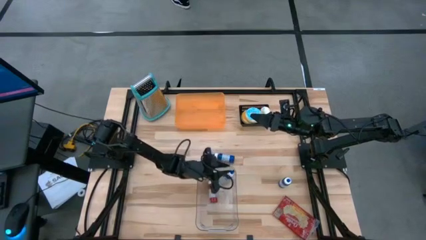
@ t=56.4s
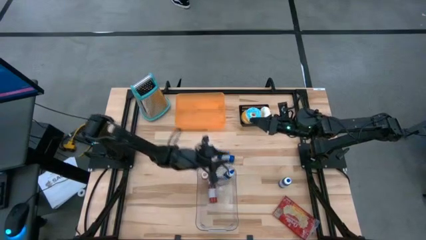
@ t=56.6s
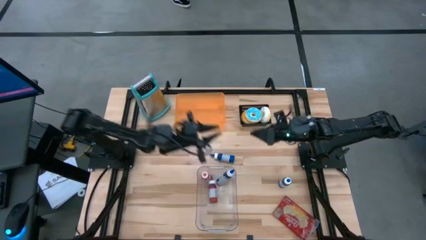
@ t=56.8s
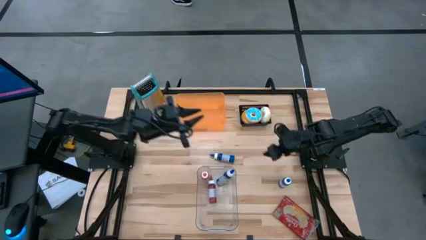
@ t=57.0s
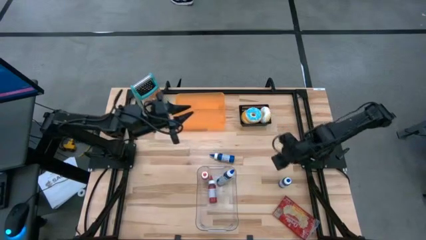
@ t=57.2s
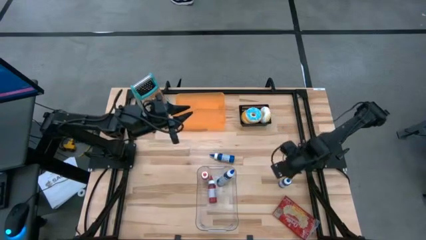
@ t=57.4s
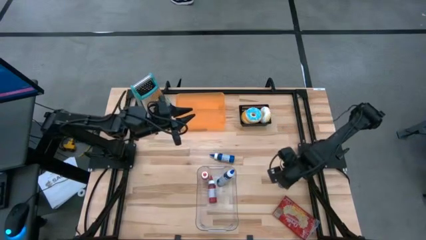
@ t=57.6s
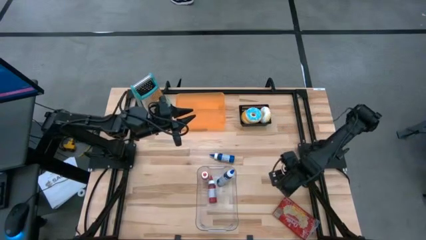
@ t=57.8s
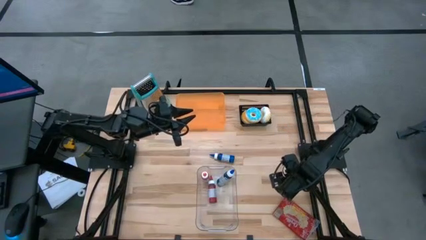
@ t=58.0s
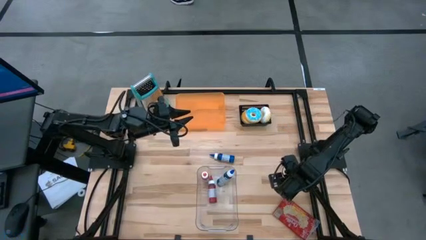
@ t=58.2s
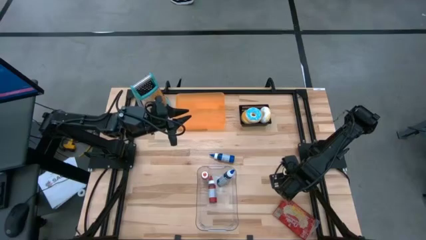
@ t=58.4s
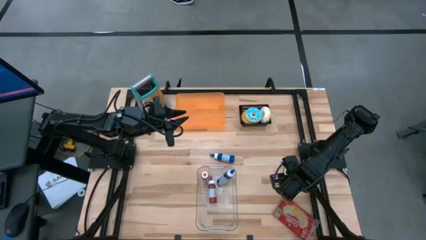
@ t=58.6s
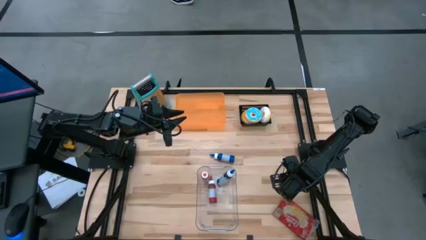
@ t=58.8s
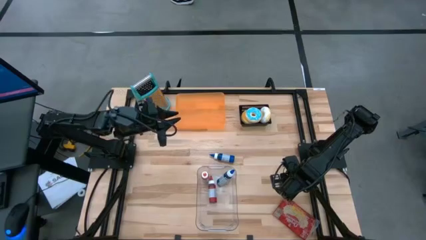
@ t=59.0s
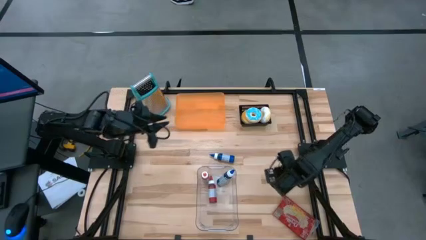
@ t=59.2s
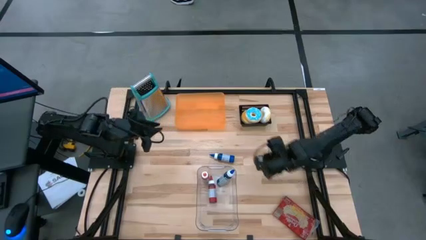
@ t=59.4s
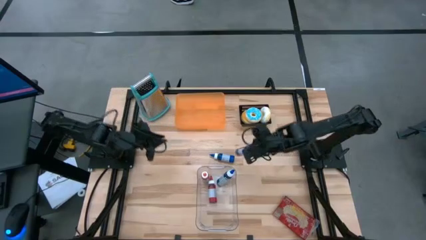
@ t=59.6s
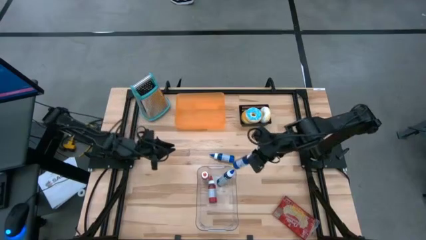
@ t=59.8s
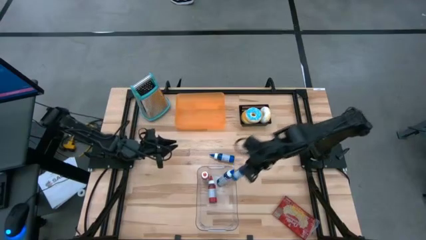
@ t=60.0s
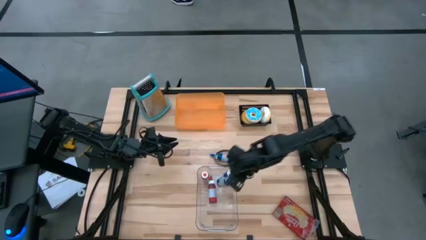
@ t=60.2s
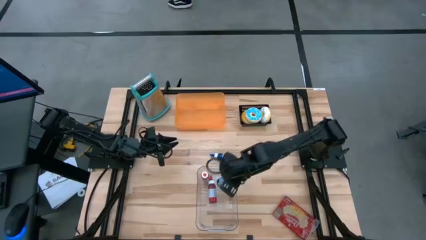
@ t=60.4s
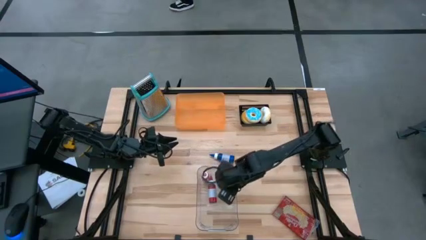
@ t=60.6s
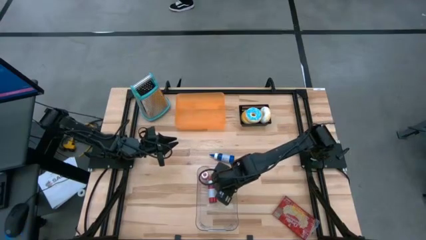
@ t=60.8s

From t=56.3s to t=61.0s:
Put the right blue food coloring bottle into the transparent bin

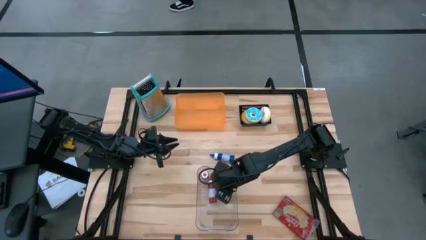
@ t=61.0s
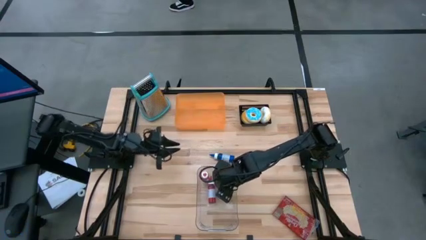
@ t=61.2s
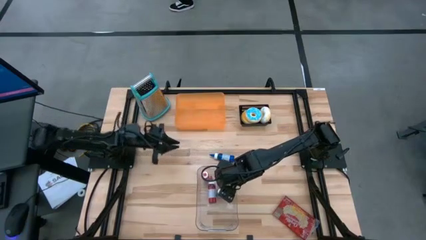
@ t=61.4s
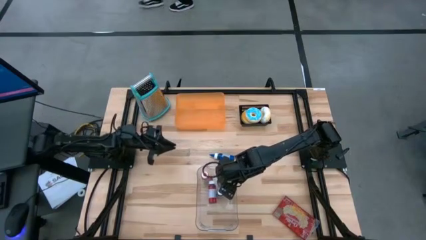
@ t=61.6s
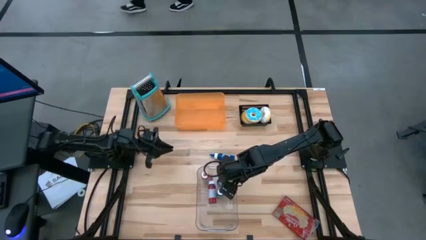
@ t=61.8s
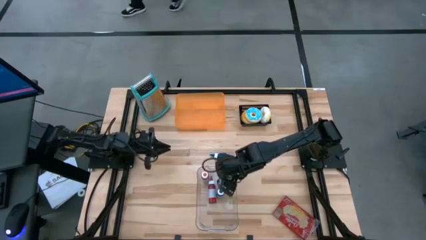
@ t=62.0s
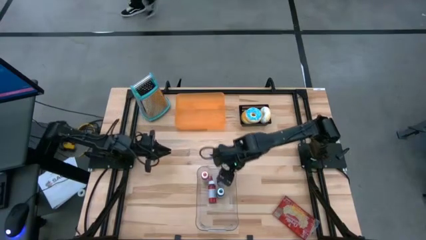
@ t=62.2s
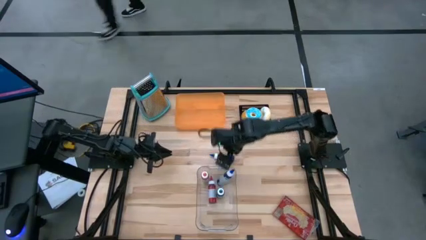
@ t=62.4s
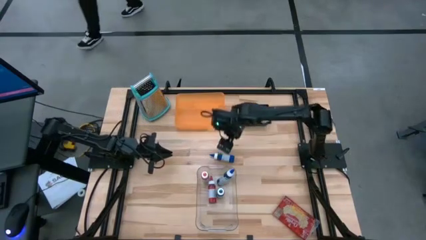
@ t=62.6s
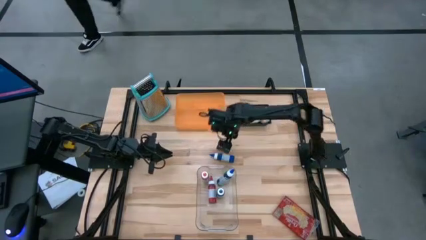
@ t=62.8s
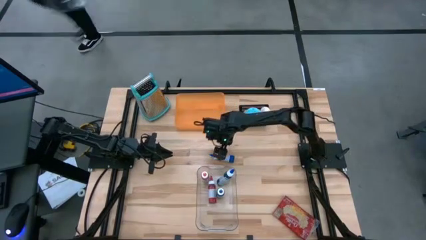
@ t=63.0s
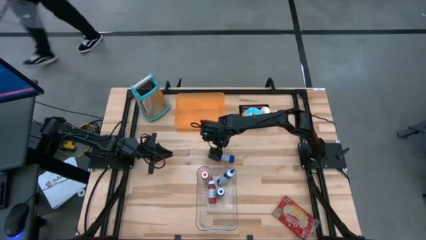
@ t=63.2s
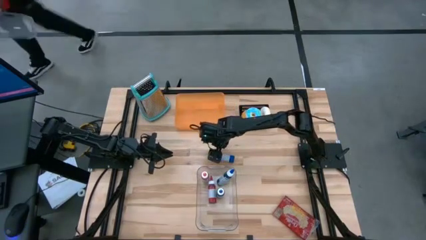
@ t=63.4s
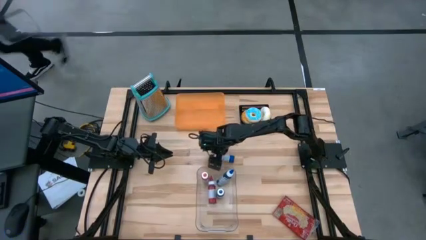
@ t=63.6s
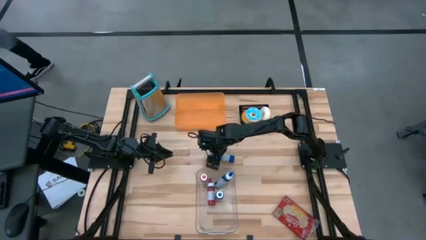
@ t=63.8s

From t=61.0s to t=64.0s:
Put the blue food coloring bottle into the transparent bin

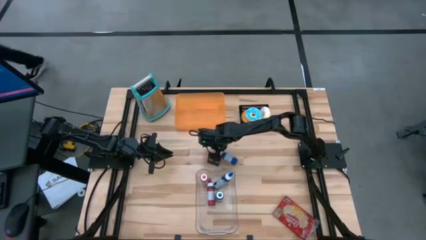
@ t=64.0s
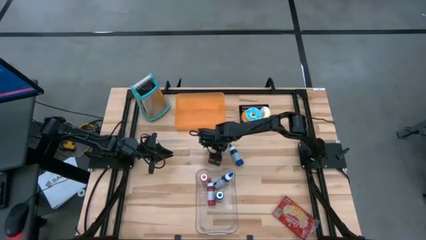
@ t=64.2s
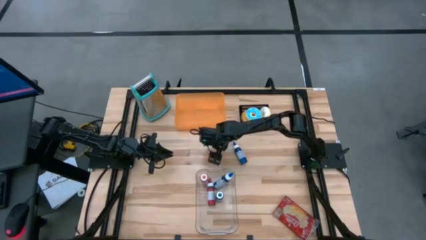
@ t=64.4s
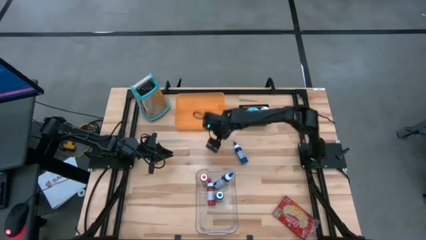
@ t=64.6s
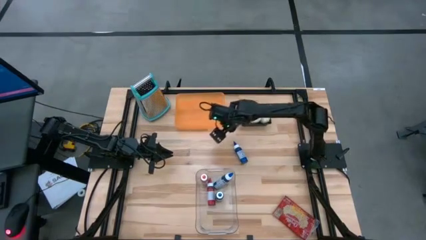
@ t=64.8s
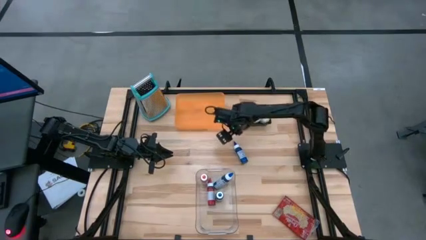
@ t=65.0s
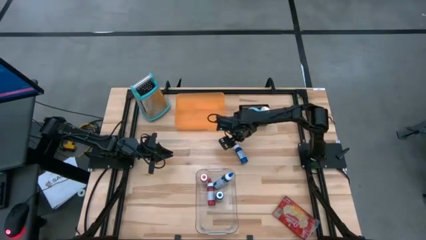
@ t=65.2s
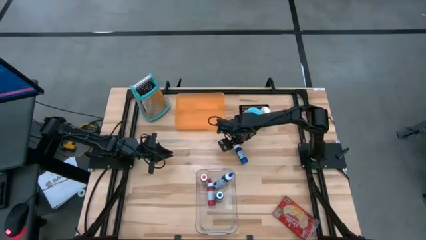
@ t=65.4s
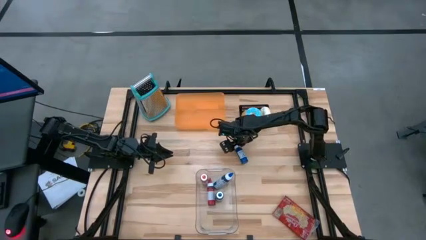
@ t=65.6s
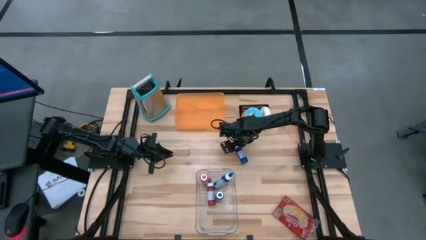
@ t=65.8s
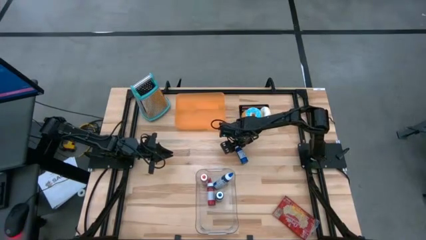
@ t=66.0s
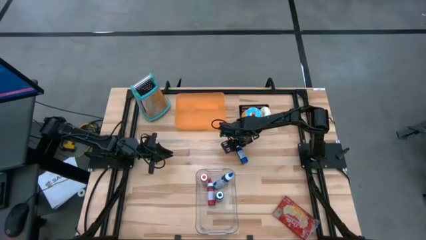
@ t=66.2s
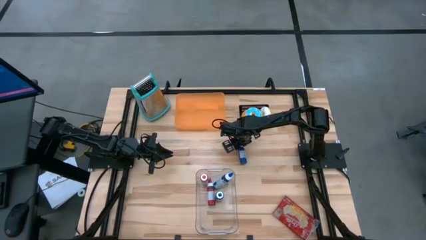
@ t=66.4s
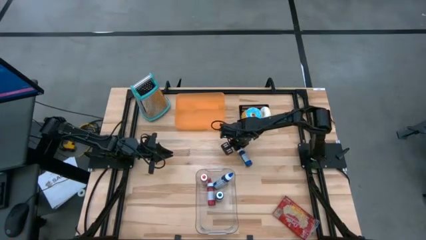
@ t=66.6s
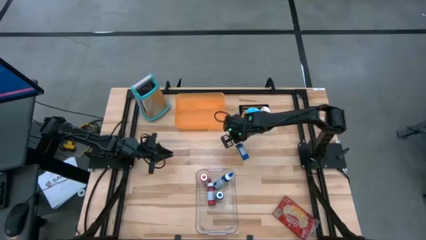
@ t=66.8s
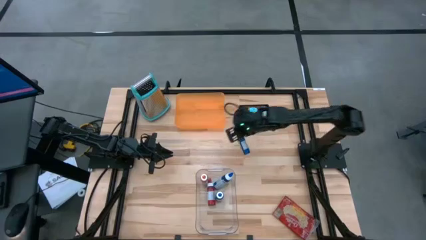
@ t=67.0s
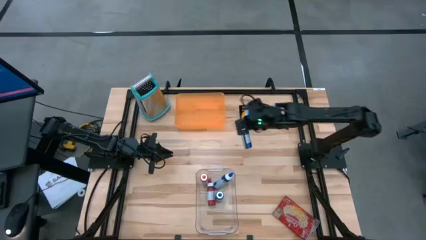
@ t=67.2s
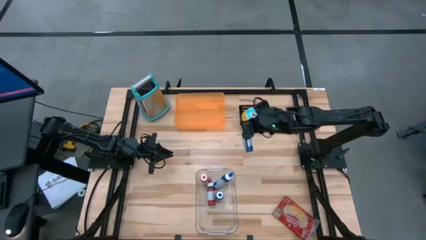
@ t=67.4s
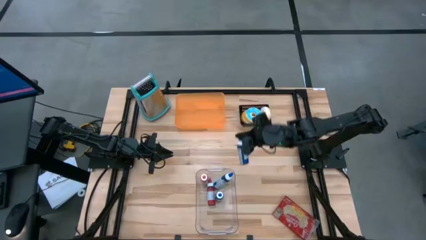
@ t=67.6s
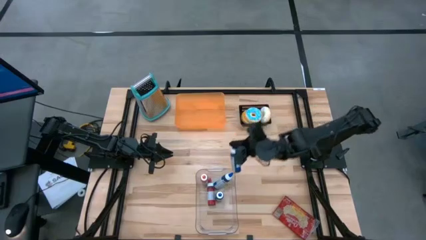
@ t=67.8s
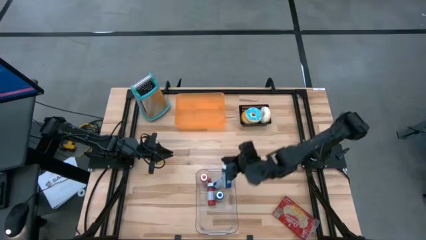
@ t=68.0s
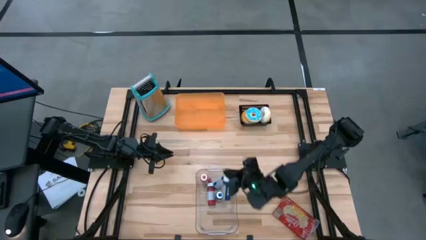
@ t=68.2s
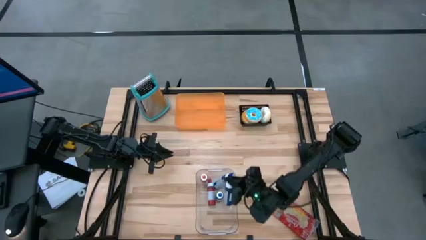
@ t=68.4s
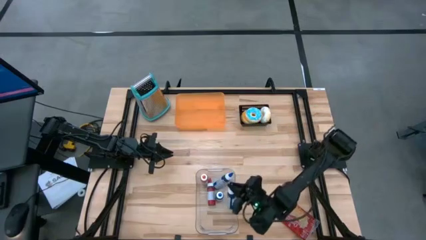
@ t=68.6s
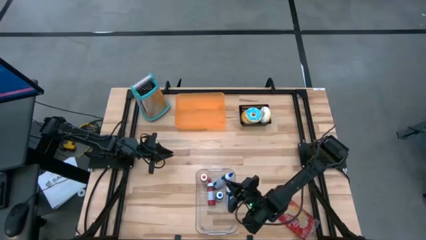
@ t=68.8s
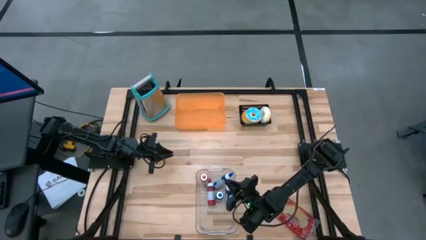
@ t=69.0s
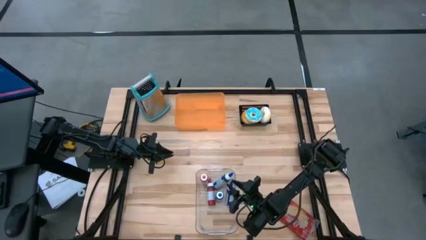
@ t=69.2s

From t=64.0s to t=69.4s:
Put the blue food coloring bottle into the transparent bin

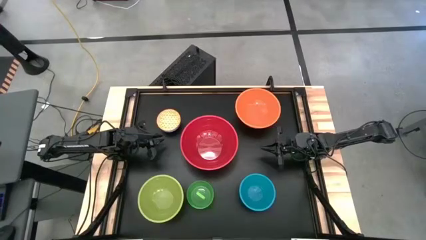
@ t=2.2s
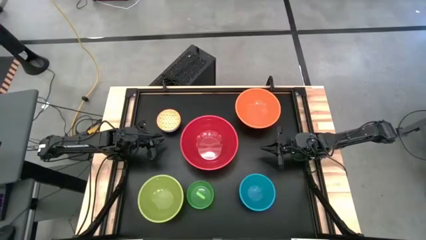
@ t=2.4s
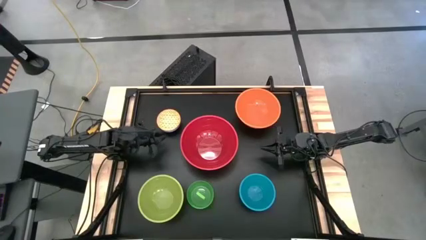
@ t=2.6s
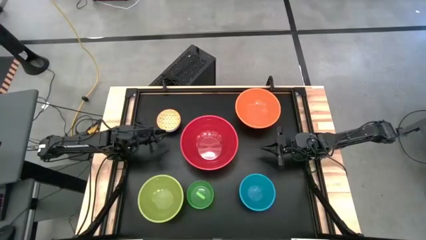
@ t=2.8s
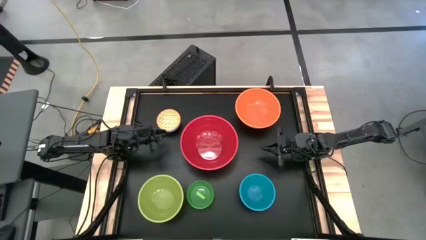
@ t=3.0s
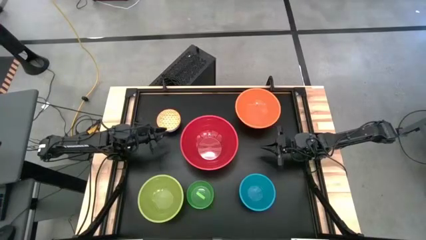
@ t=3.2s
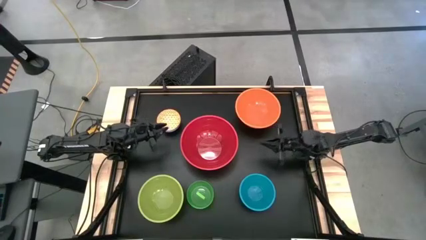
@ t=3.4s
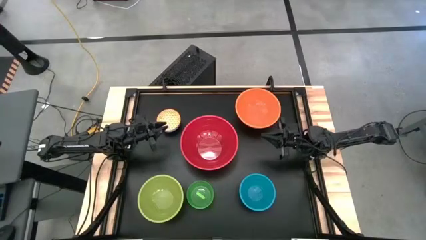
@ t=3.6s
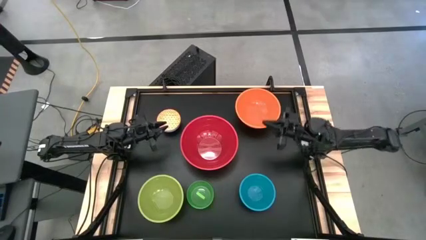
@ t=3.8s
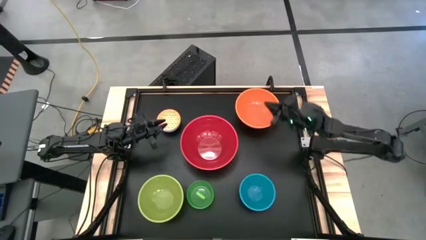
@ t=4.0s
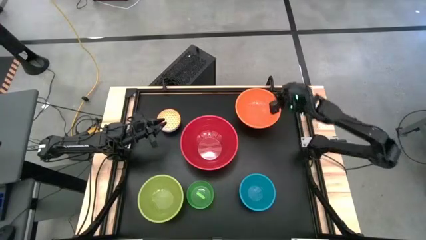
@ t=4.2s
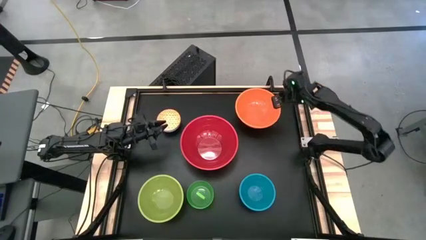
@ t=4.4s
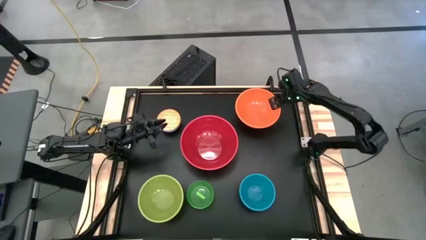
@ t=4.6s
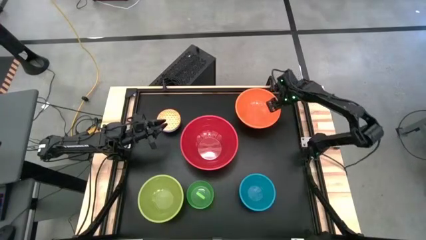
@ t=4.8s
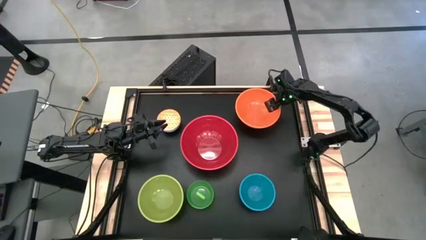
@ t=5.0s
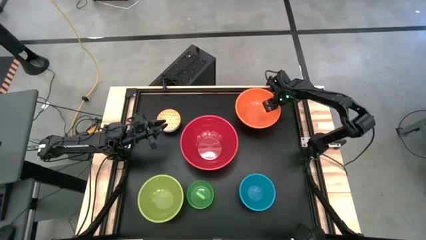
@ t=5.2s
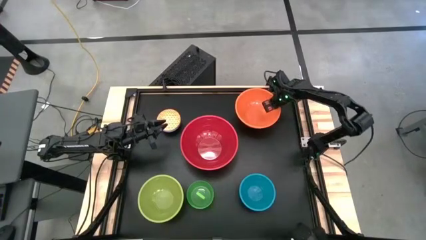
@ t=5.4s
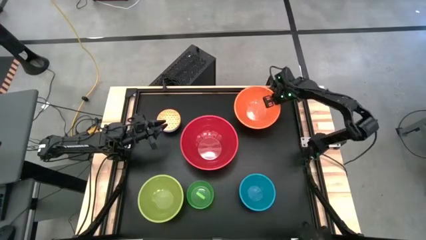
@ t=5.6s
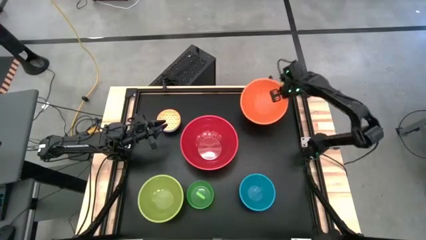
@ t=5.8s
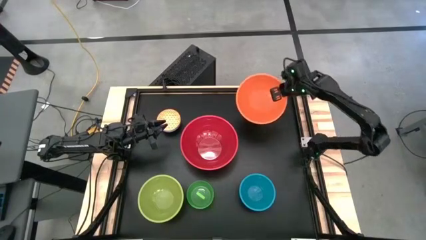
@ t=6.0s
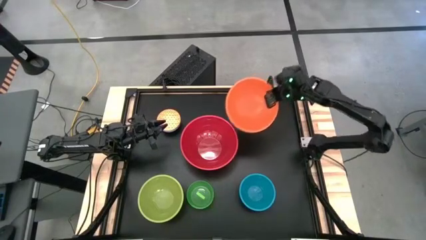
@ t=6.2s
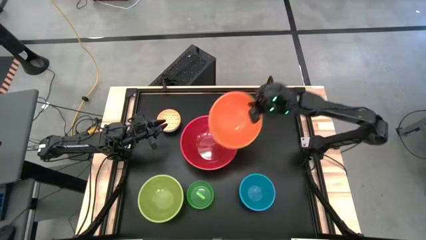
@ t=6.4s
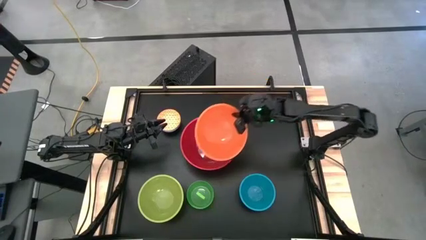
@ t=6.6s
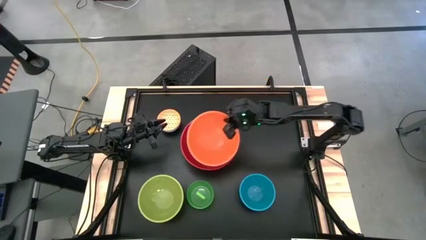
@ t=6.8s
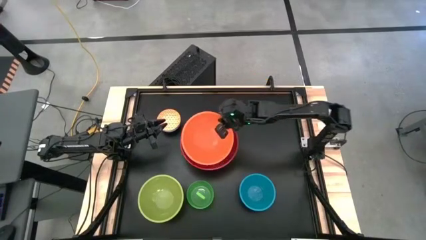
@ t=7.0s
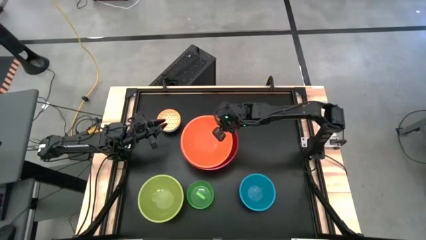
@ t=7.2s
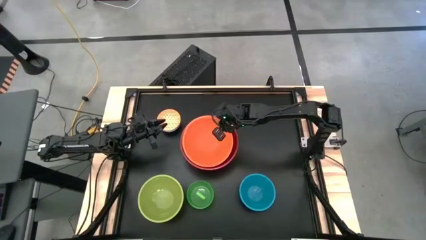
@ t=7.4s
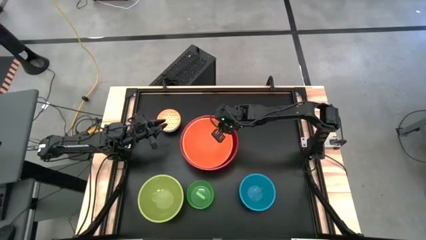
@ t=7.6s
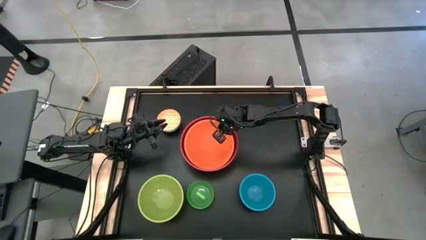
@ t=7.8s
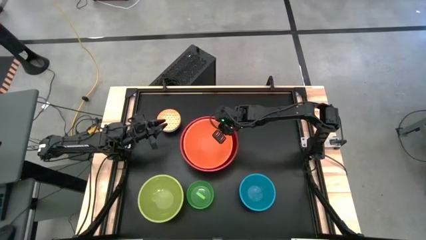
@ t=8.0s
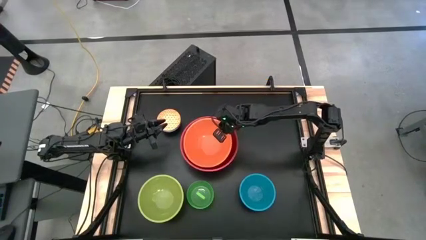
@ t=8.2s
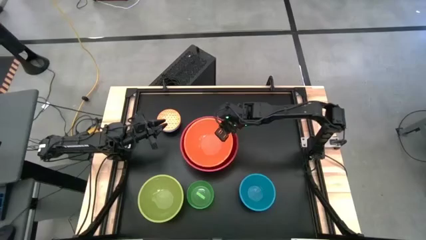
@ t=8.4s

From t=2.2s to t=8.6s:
Stack the orange bowl on top of the red bowl
